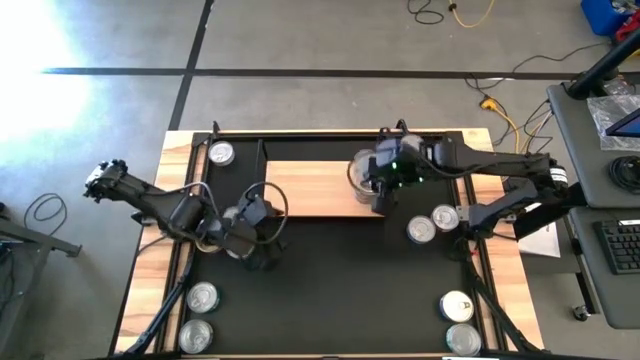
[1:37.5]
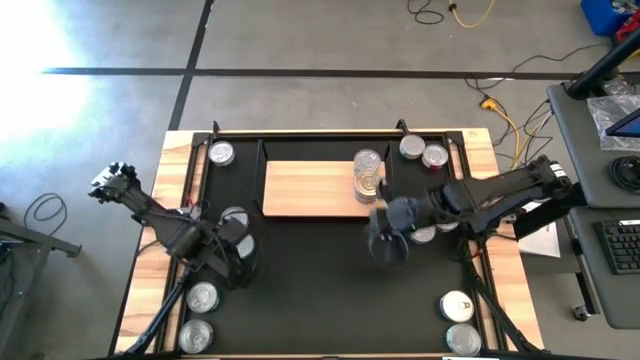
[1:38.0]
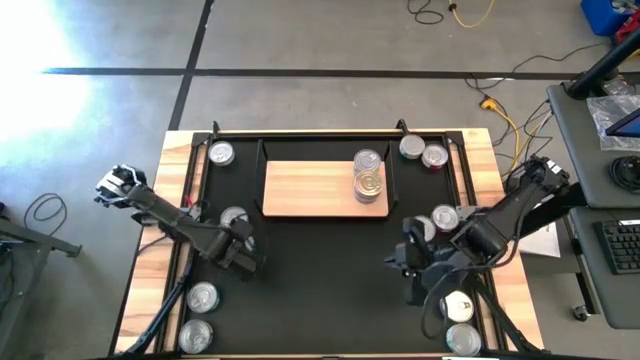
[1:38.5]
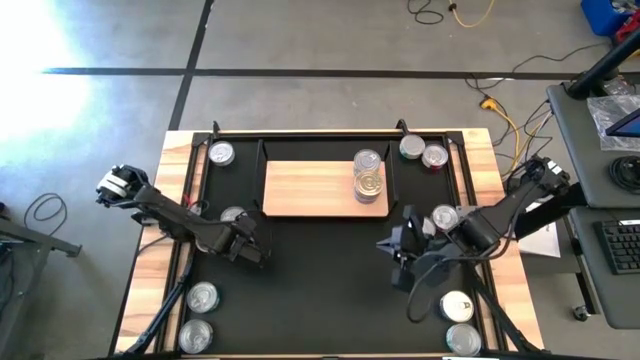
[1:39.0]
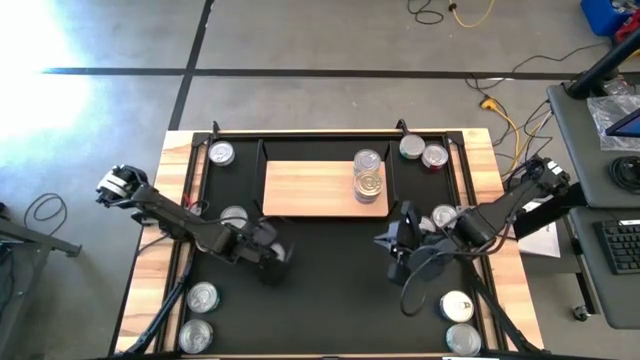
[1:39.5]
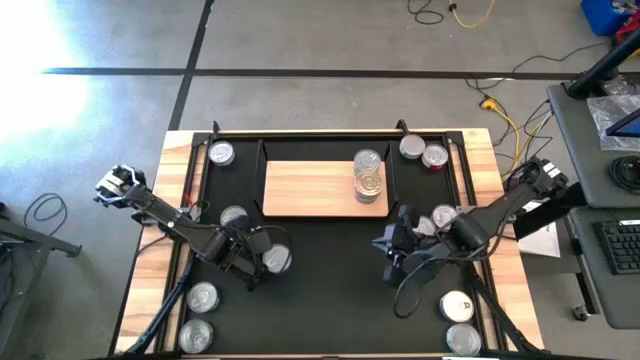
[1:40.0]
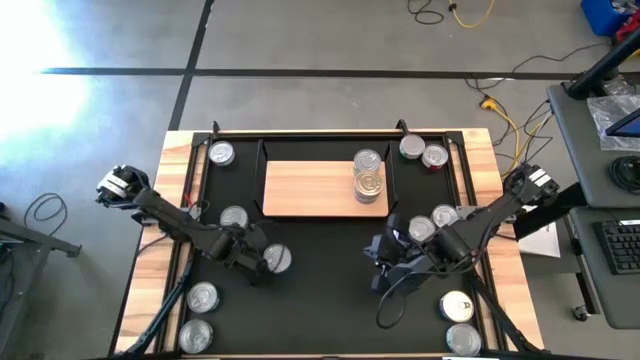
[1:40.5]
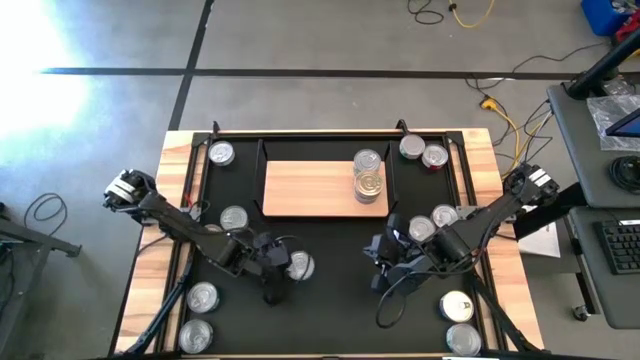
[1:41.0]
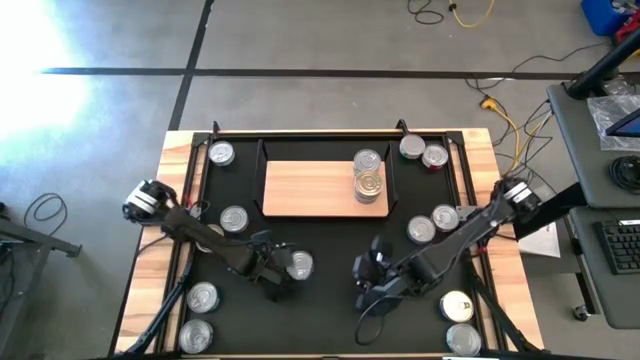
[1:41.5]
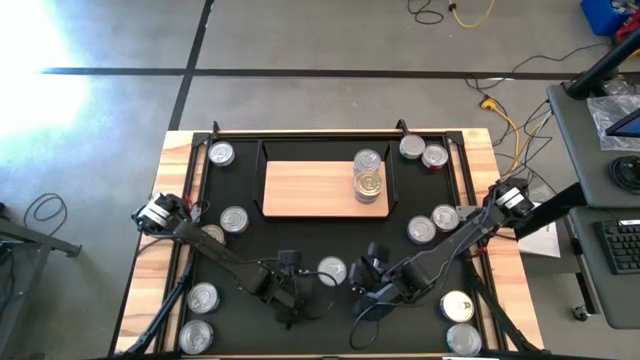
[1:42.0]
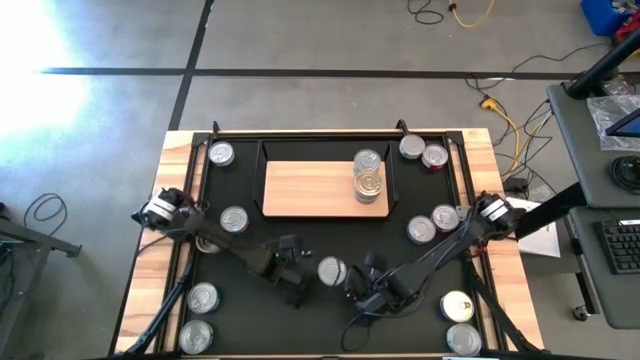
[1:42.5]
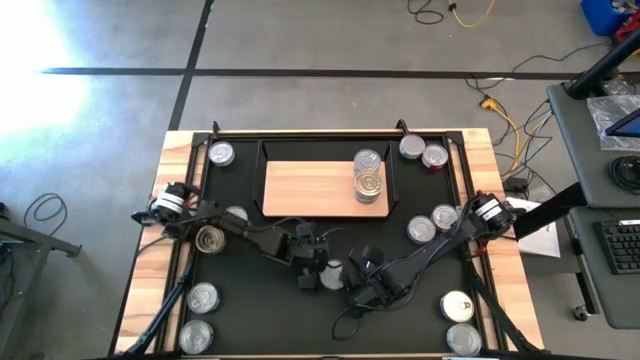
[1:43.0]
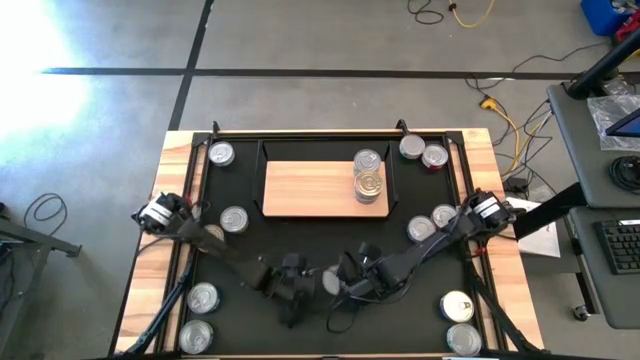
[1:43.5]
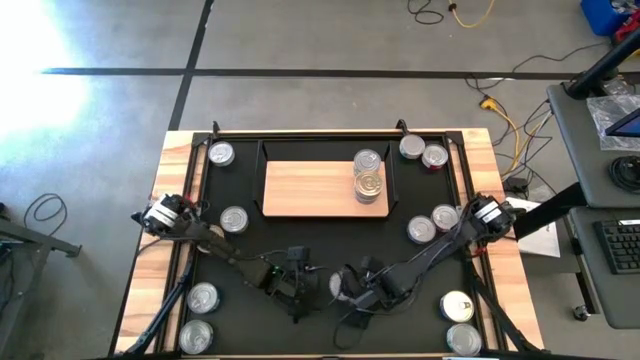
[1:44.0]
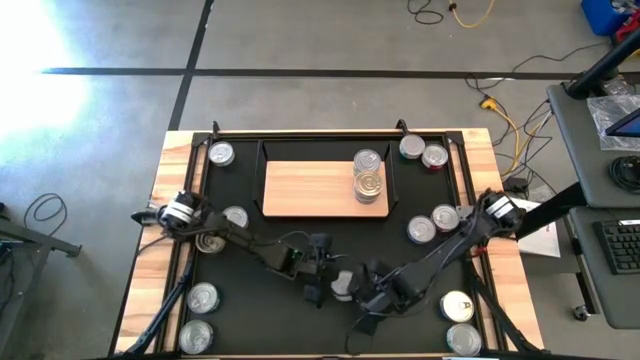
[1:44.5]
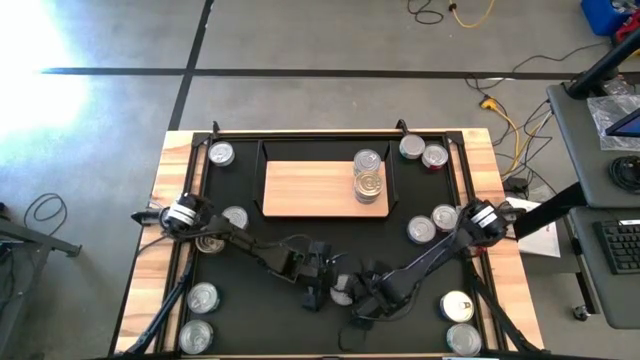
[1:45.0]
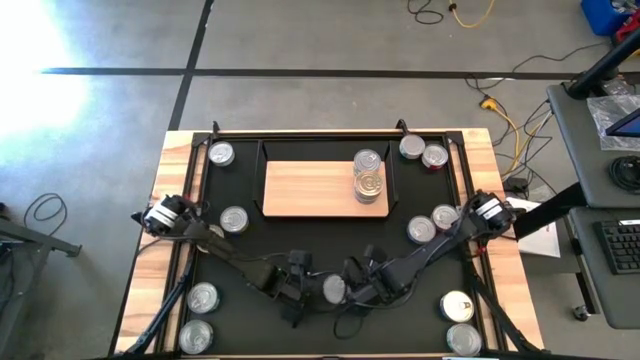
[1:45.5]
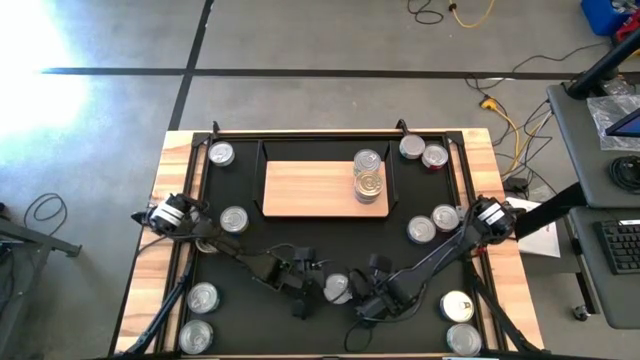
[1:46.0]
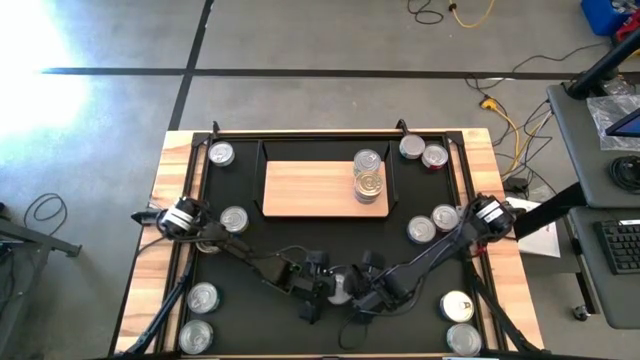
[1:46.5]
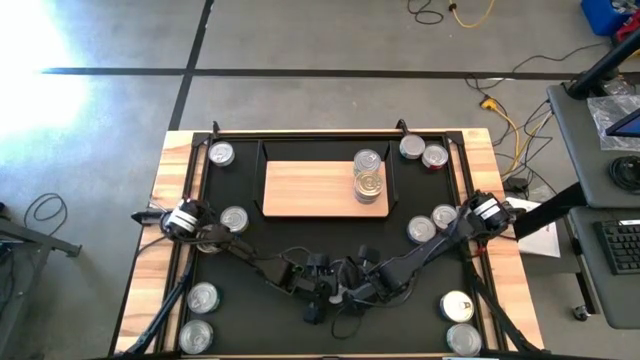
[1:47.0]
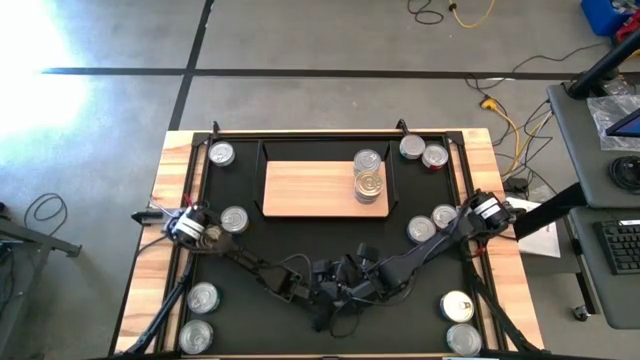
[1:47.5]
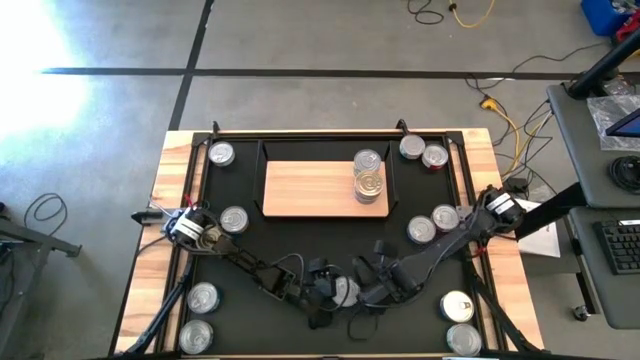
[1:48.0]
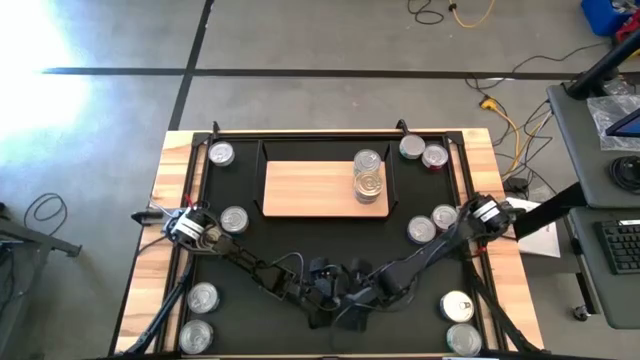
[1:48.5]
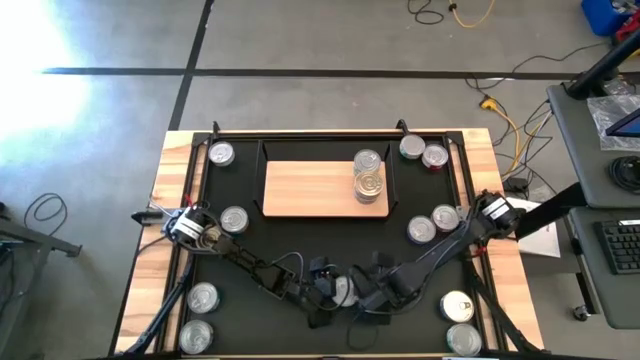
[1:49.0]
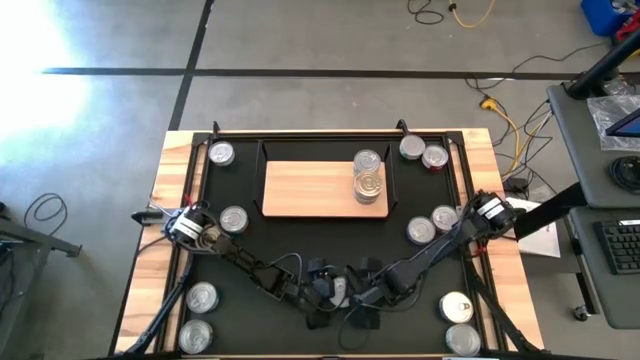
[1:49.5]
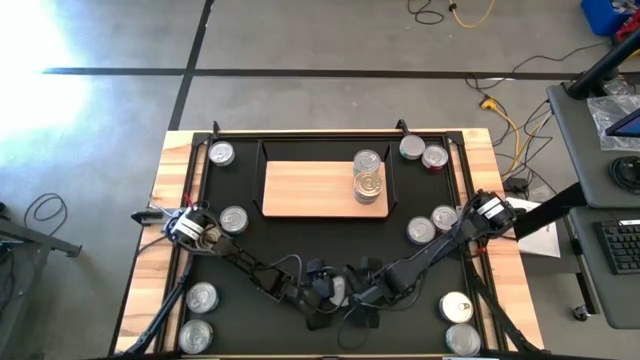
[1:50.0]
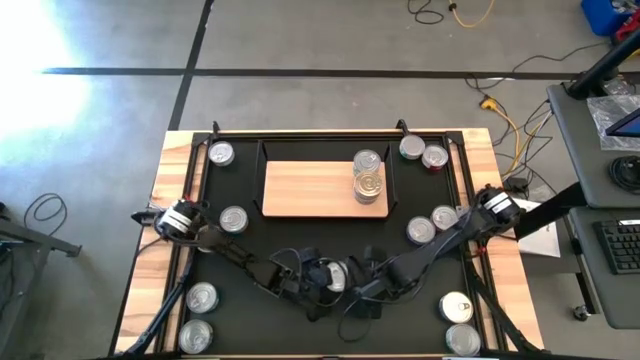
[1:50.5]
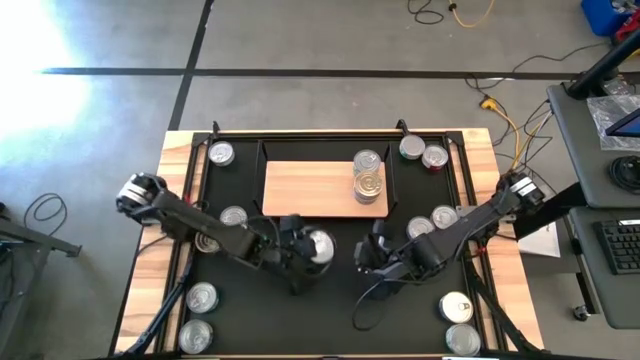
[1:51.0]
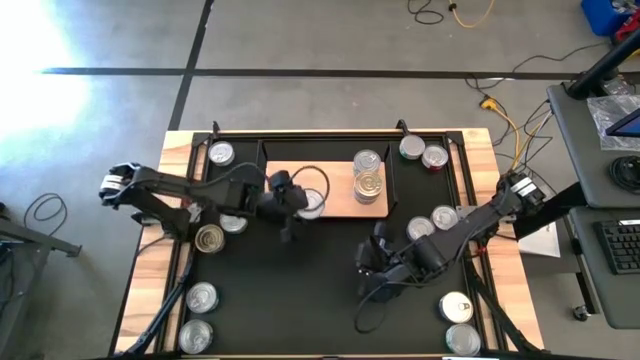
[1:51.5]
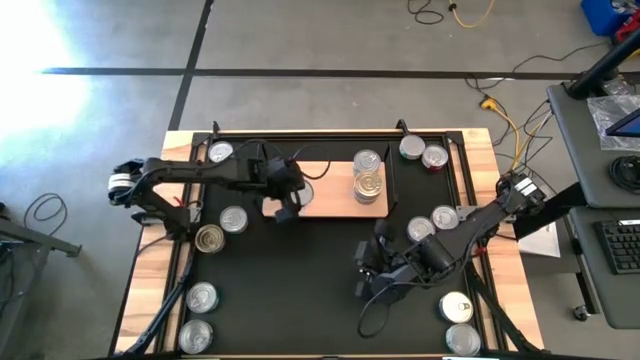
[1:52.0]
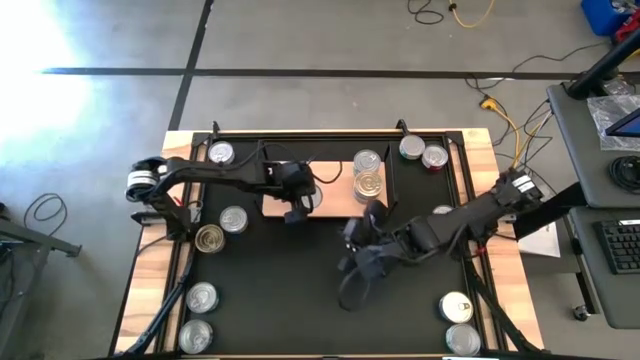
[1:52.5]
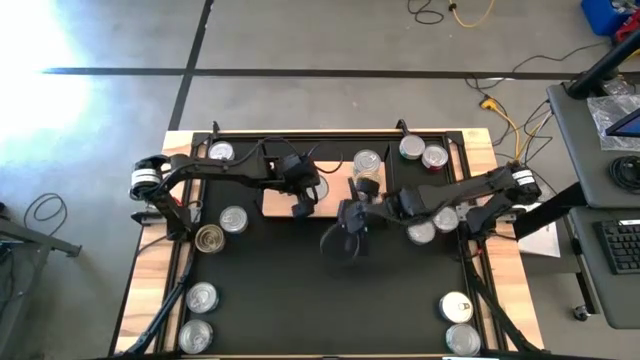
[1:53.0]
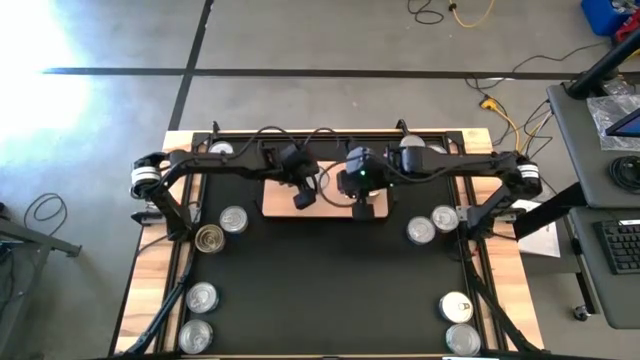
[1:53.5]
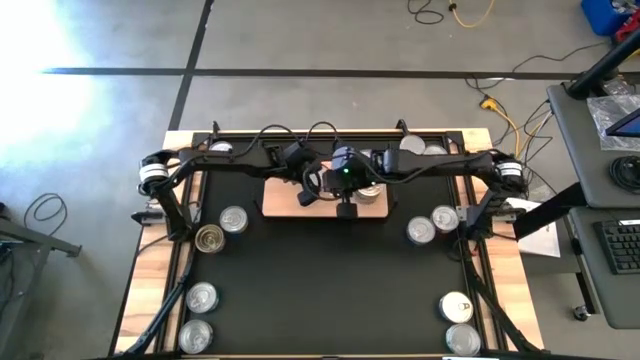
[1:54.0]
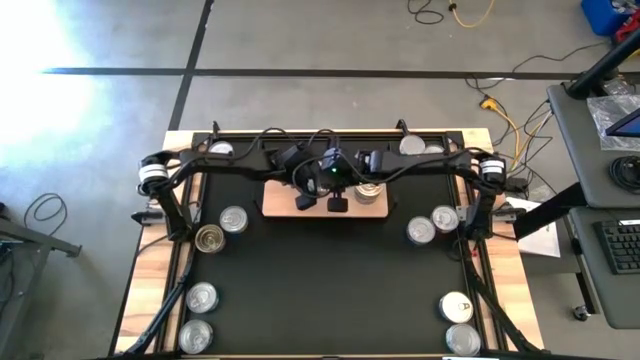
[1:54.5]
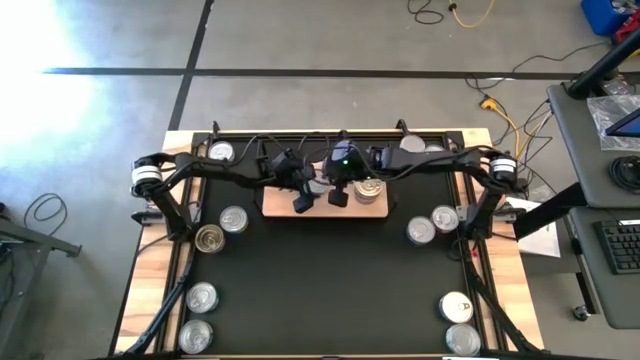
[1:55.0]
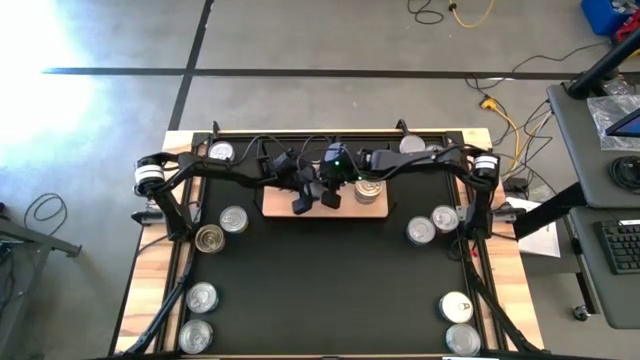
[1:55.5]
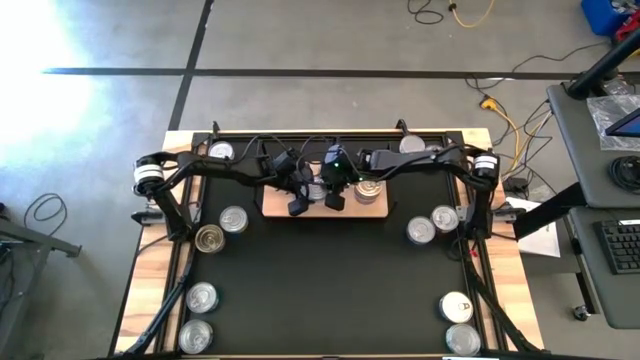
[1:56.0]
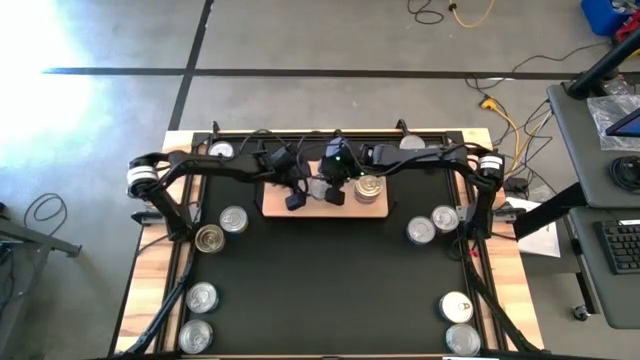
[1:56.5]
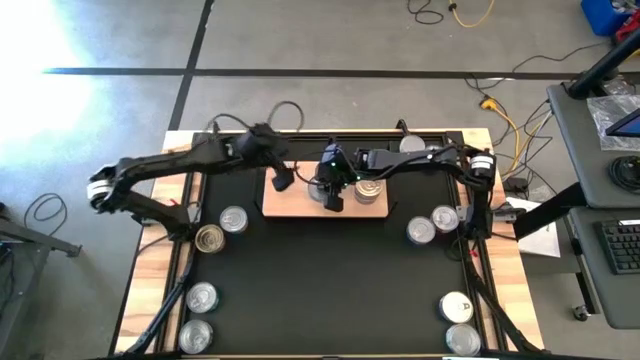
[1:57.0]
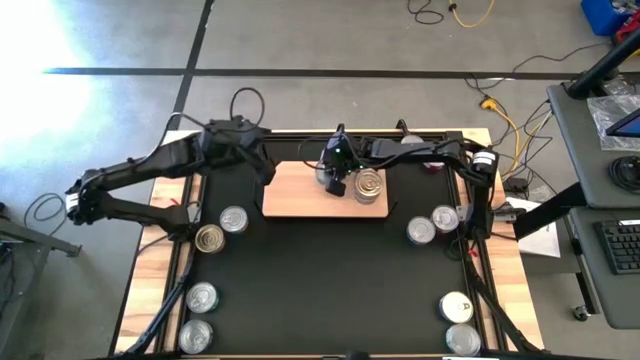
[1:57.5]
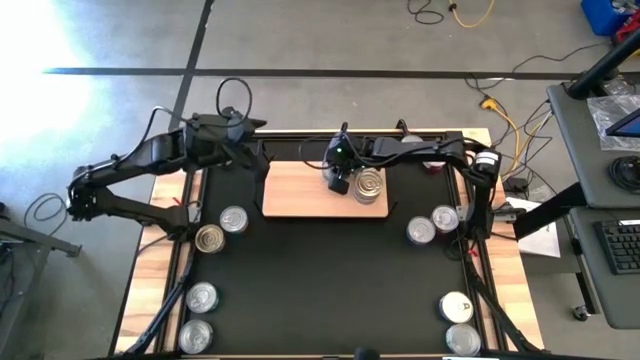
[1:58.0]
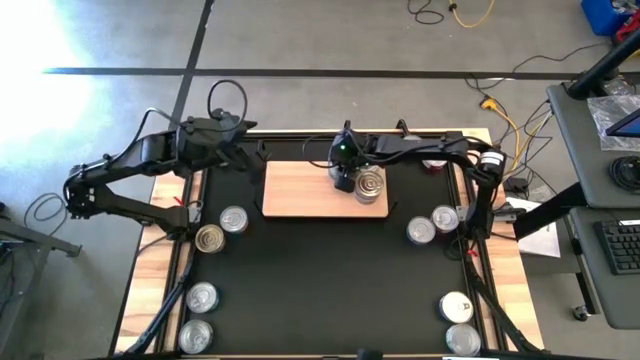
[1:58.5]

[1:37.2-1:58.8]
Task: Stack canned seafood by type on shelf
Put the light blue tuna can on the shelf

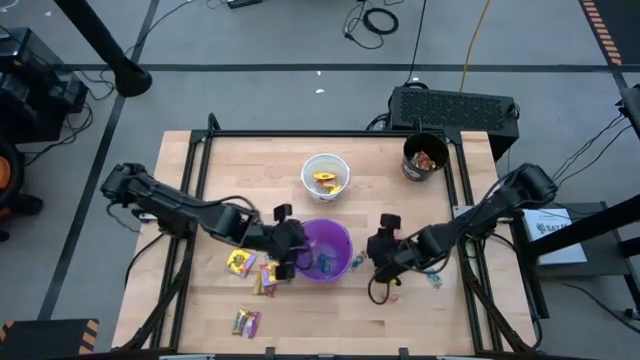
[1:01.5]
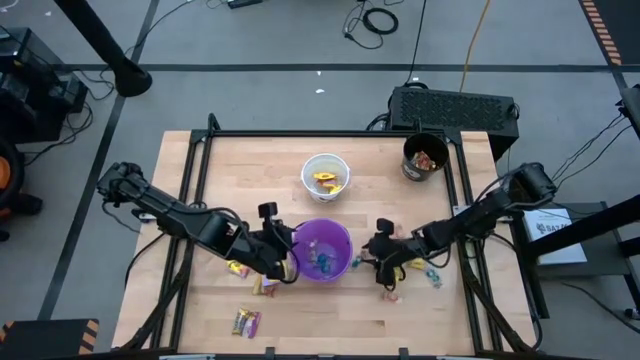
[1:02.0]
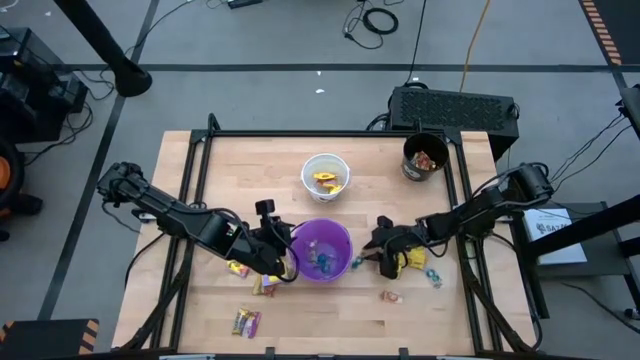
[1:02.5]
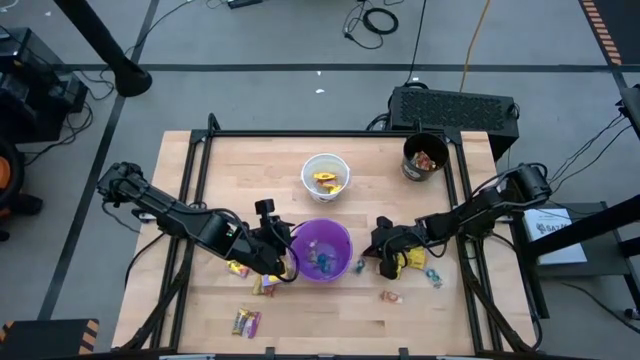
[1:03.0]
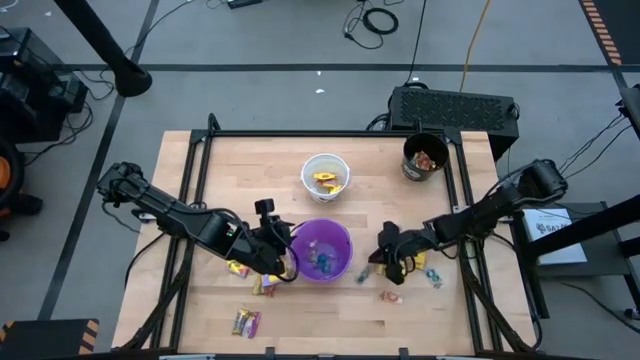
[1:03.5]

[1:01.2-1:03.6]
Task: Sort candy by brand, put in halloween buckets
Put the blue gummy into the violet bucket
